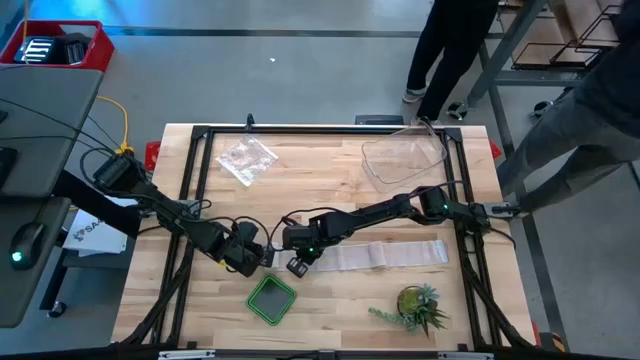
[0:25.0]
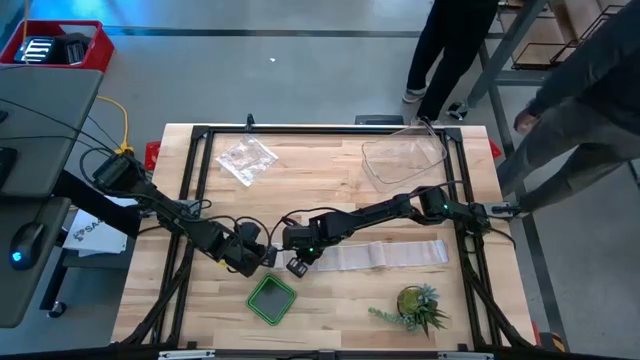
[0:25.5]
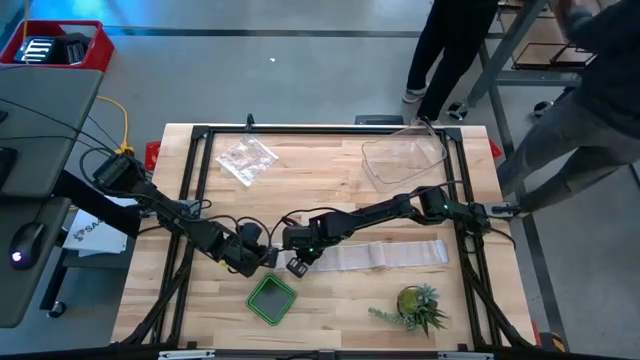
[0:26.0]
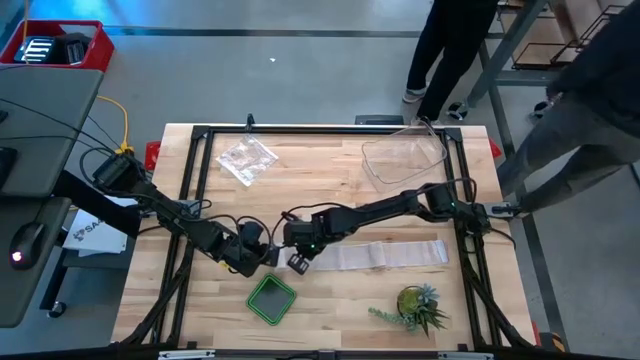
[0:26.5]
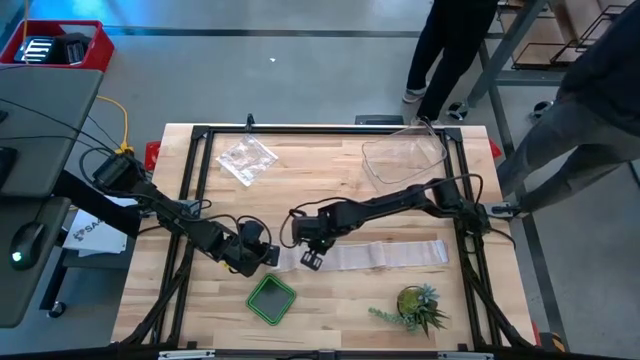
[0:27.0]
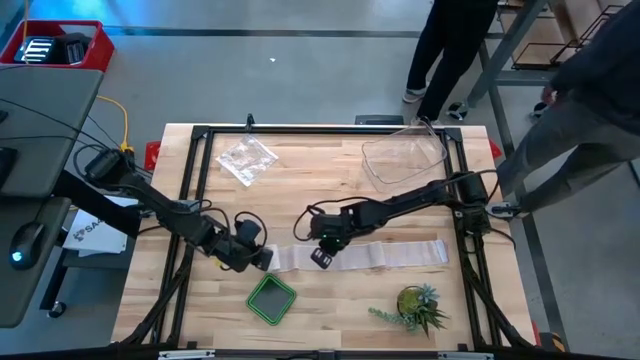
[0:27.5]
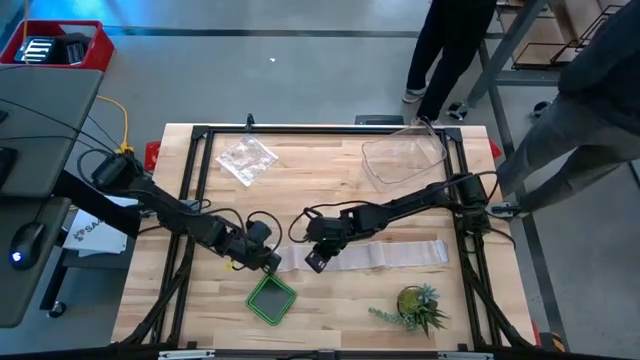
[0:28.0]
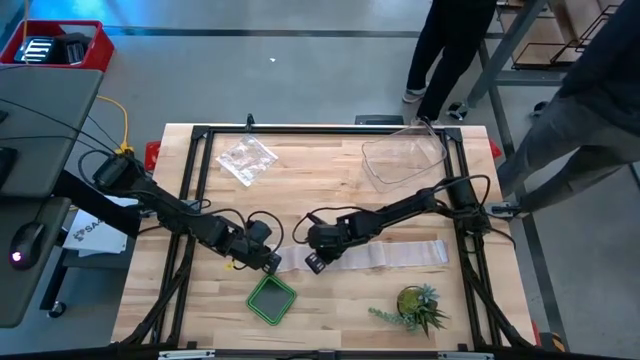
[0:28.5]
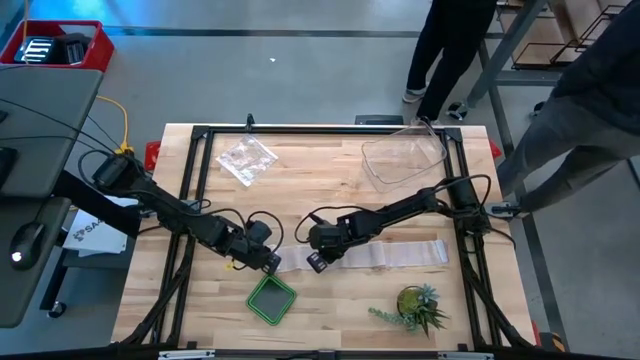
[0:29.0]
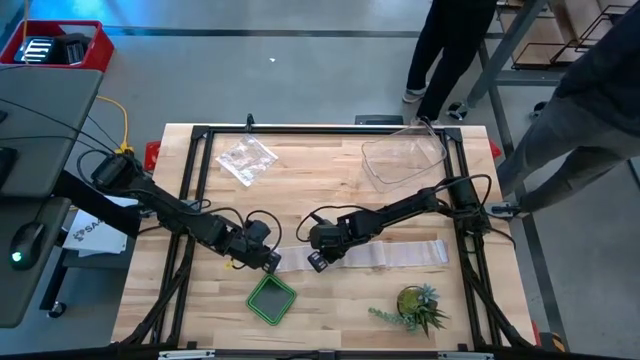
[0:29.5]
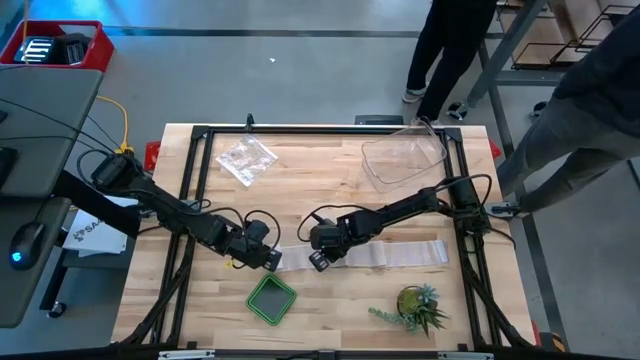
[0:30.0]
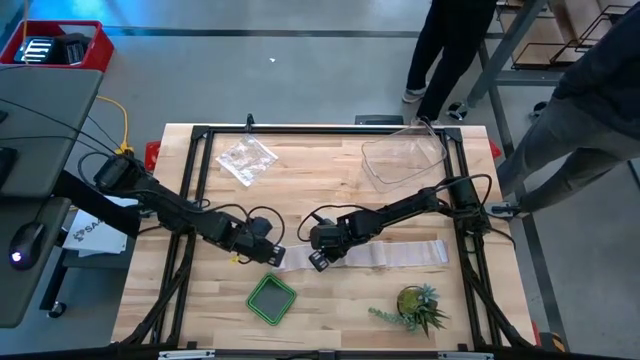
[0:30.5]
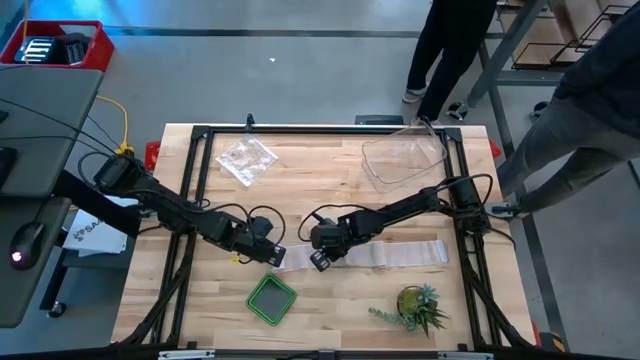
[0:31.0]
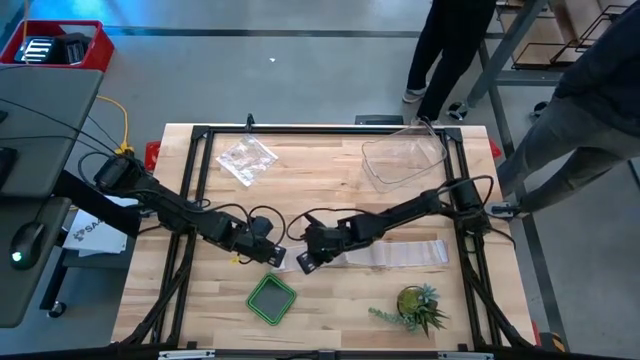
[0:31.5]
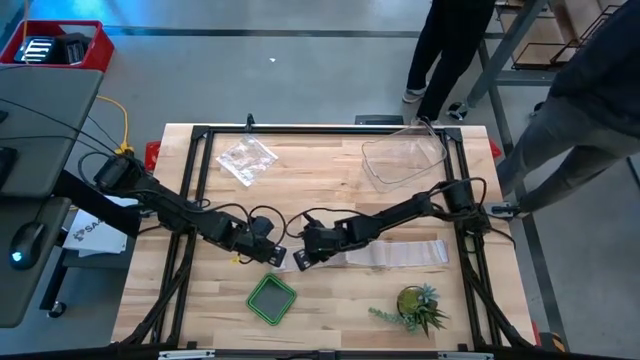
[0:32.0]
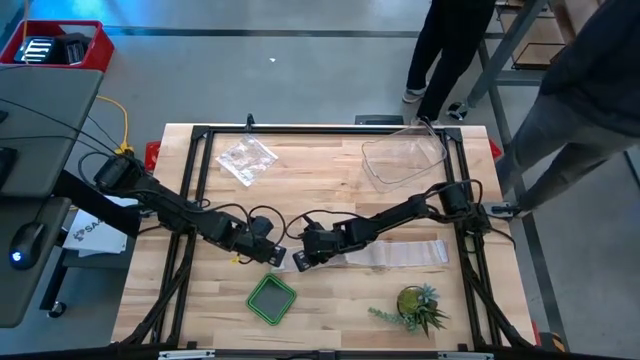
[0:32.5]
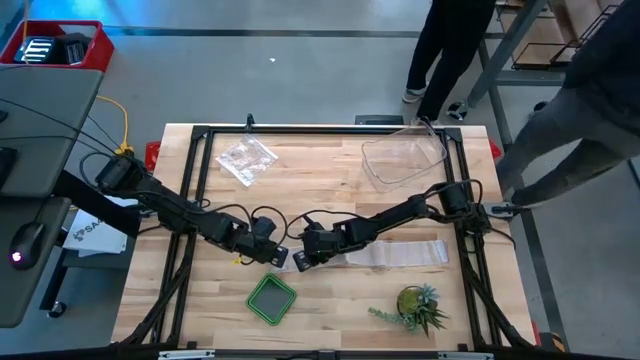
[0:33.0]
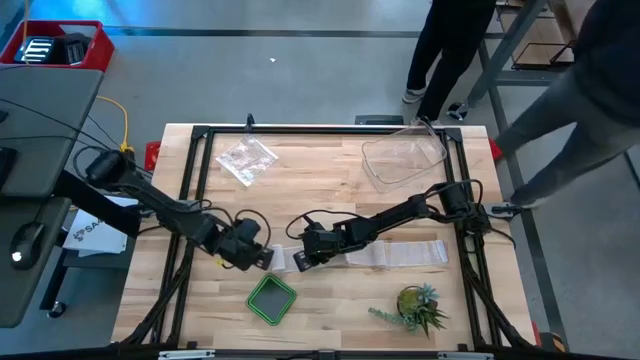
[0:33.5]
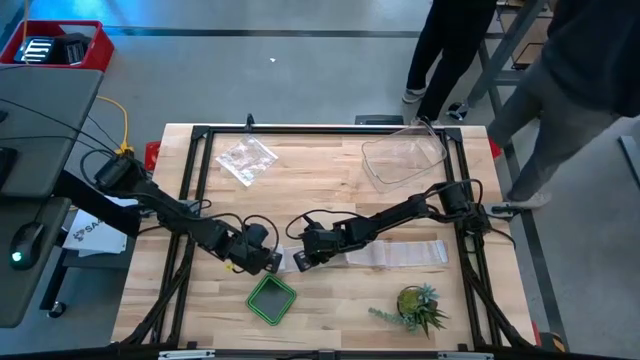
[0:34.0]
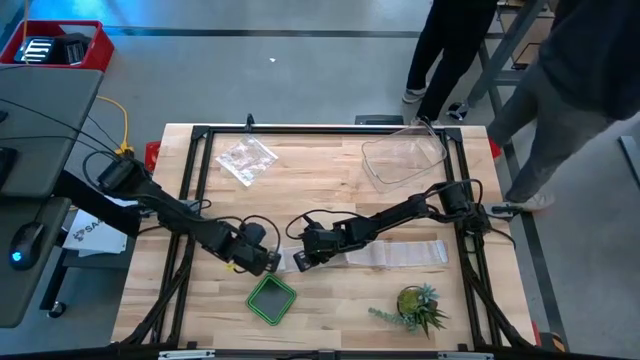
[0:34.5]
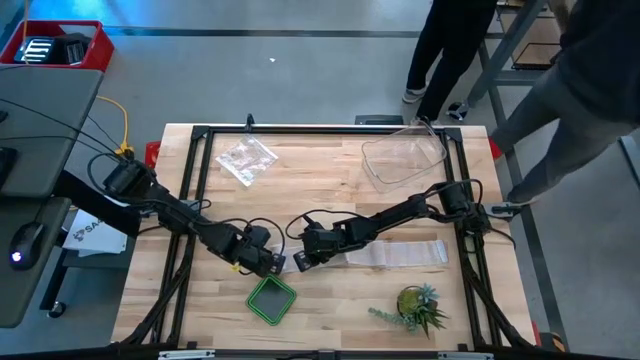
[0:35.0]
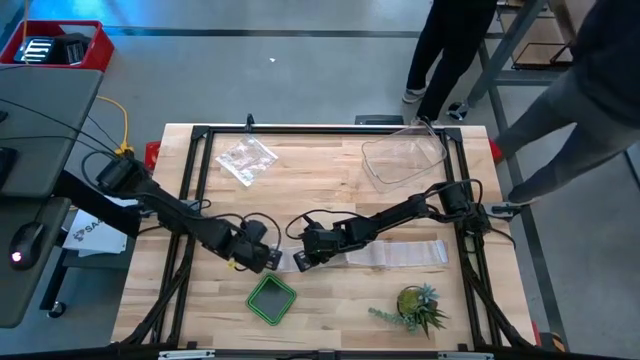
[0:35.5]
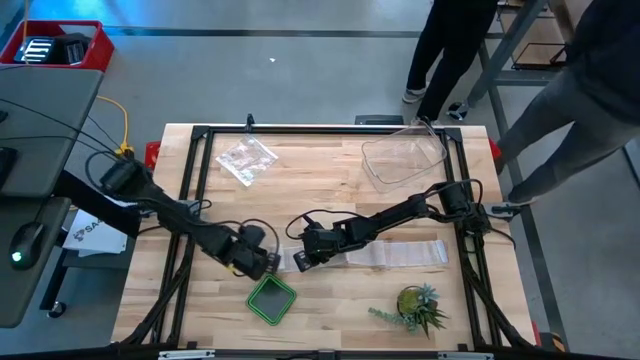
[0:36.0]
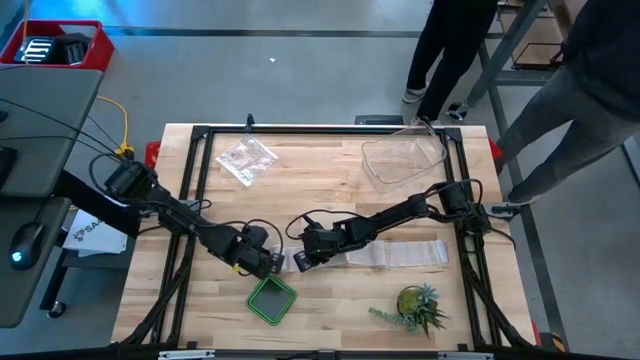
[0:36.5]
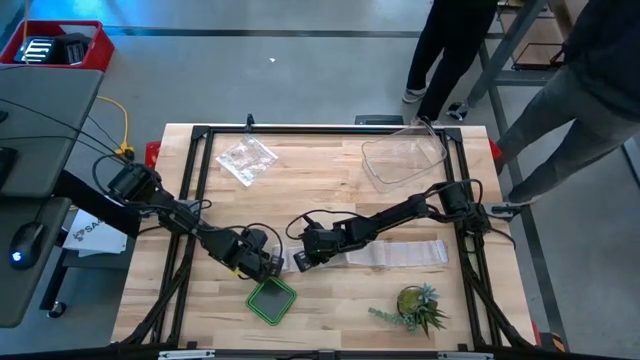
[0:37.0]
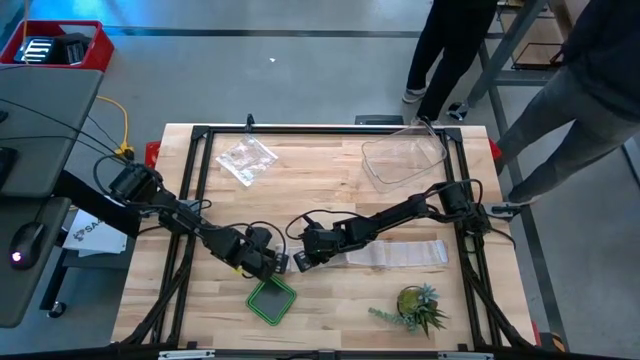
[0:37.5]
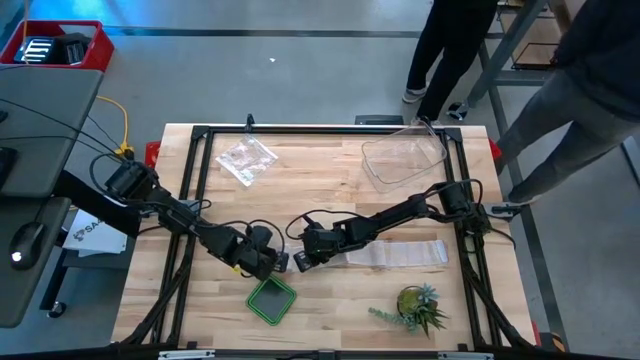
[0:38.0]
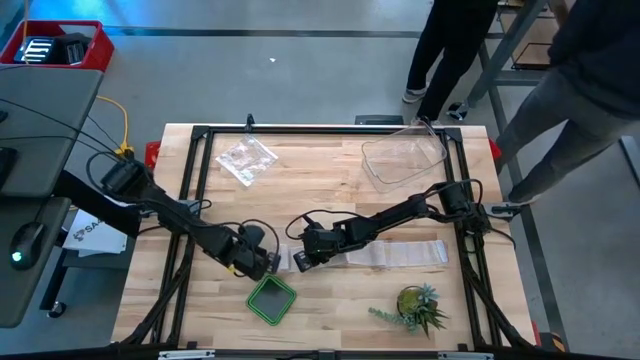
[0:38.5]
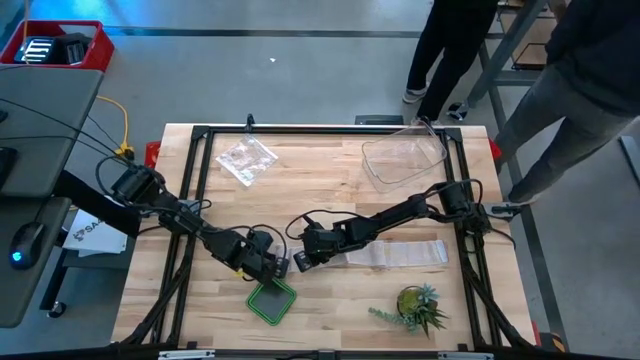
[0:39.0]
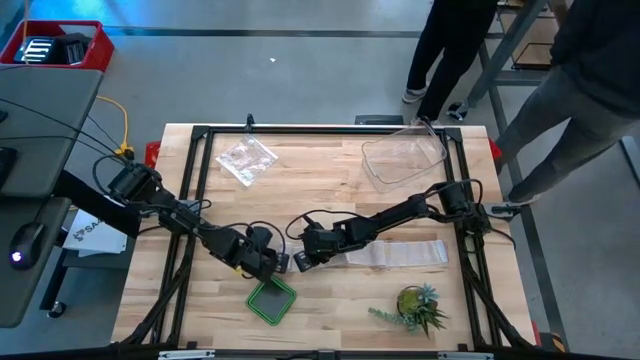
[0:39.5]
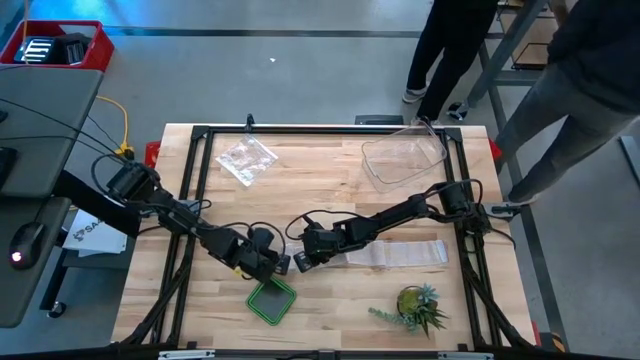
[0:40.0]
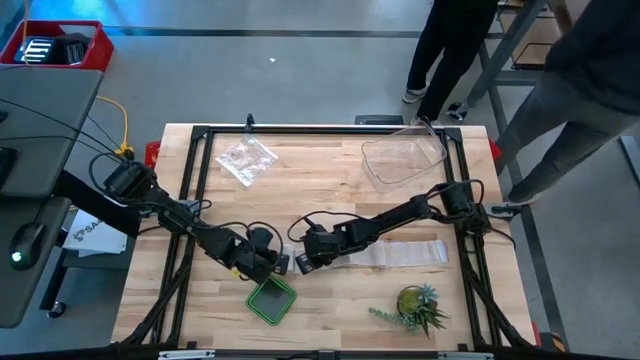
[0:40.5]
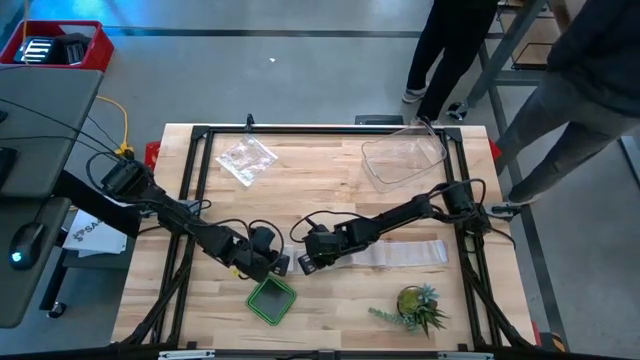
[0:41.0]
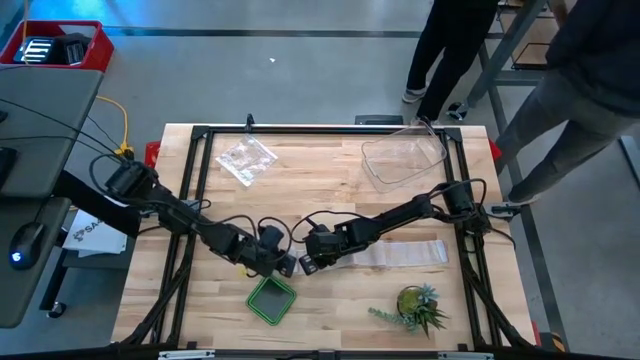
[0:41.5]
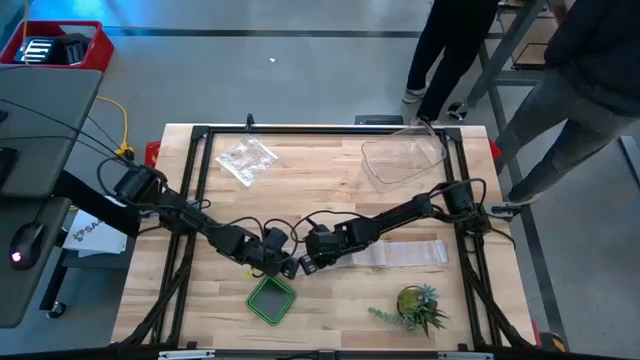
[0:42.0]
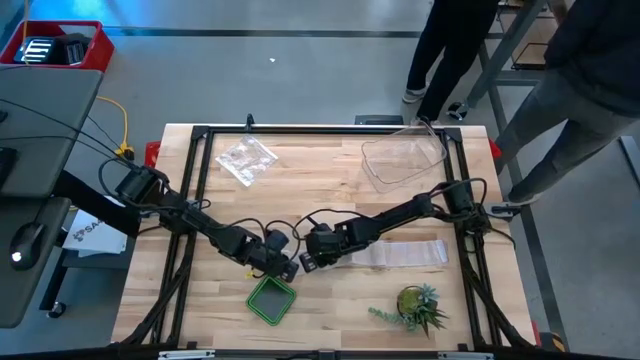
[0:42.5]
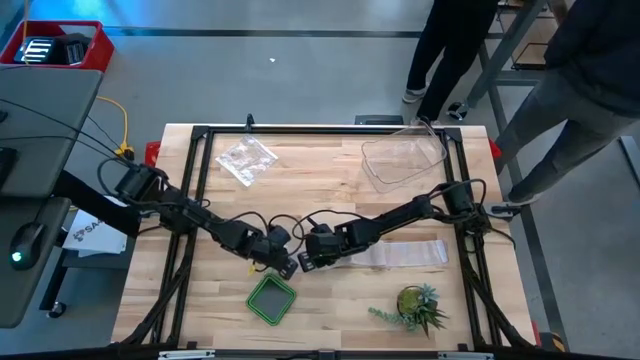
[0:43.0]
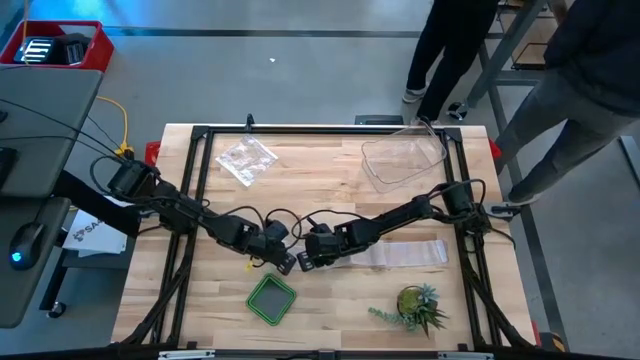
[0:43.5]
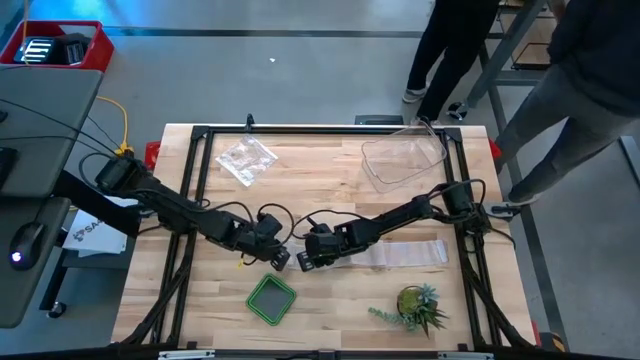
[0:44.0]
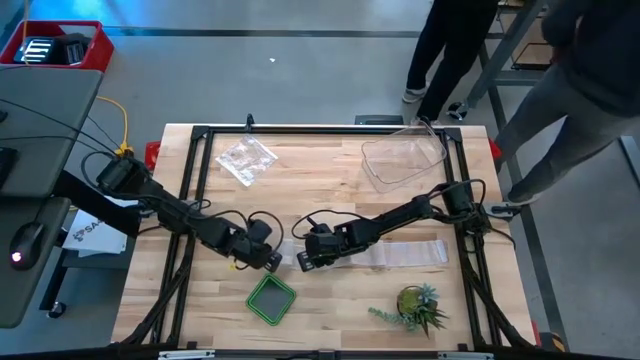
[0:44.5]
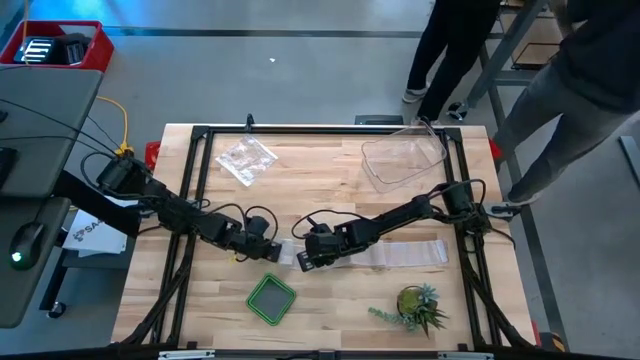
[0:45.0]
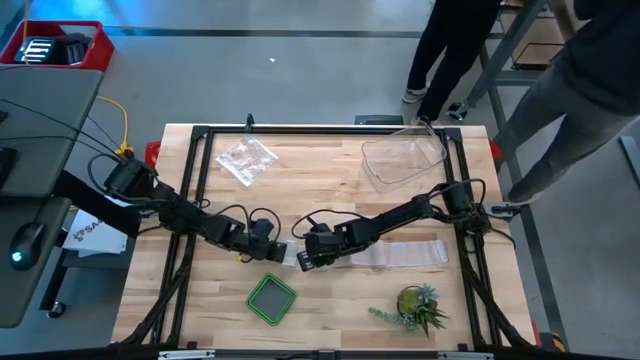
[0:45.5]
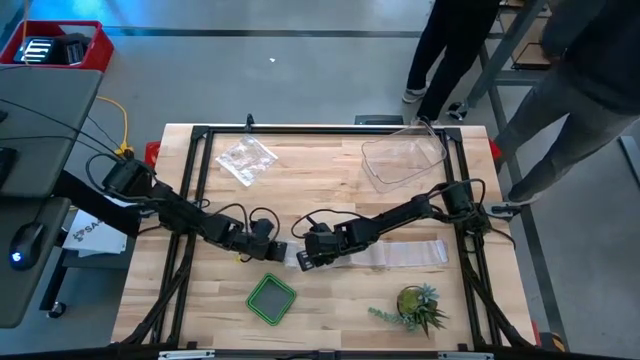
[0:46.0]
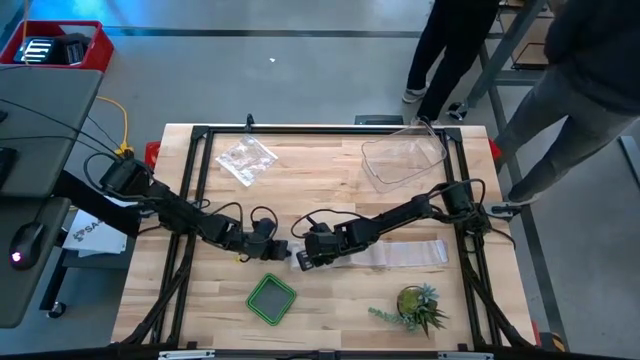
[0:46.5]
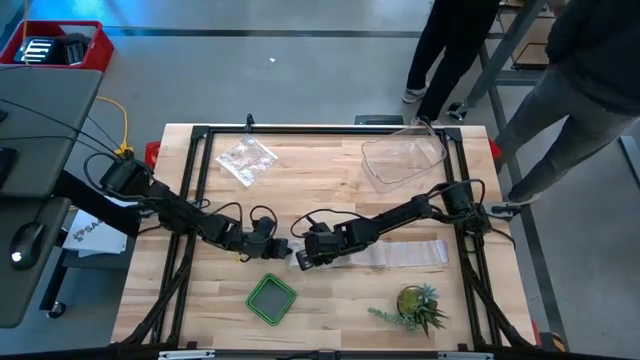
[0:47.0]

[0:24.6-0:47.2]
Task: Roll bandage
Roll the white bandage
